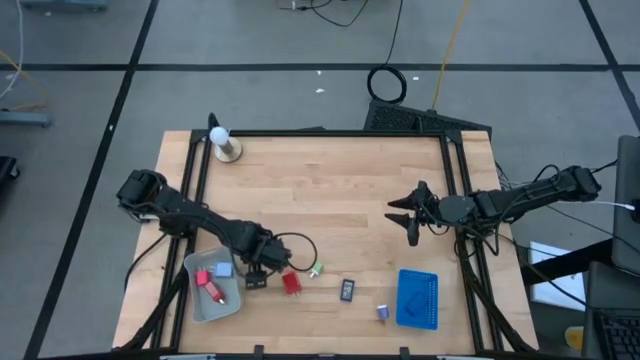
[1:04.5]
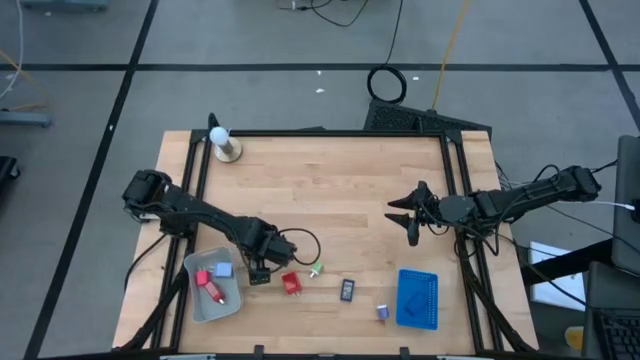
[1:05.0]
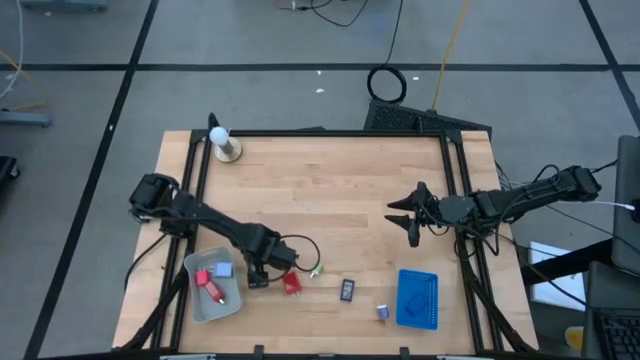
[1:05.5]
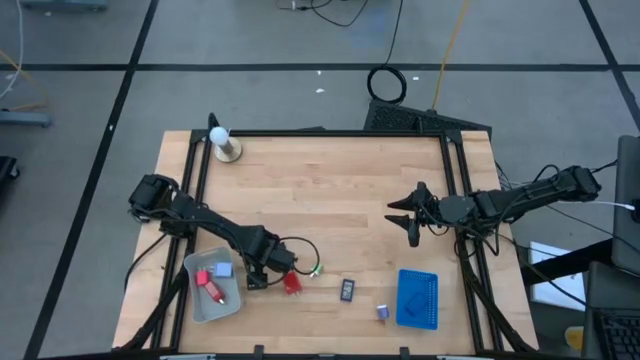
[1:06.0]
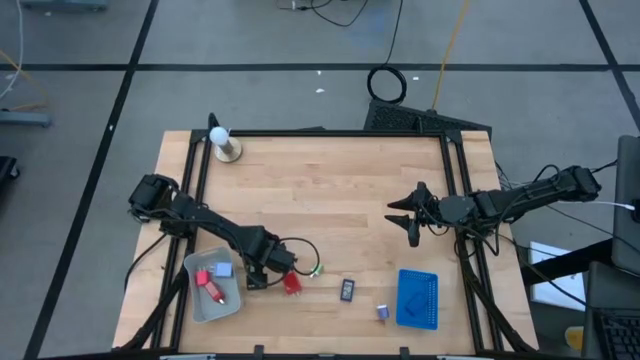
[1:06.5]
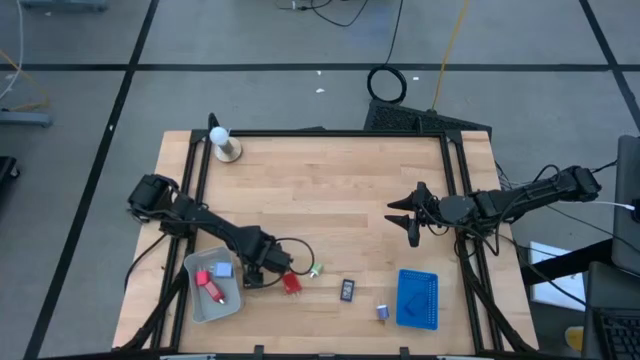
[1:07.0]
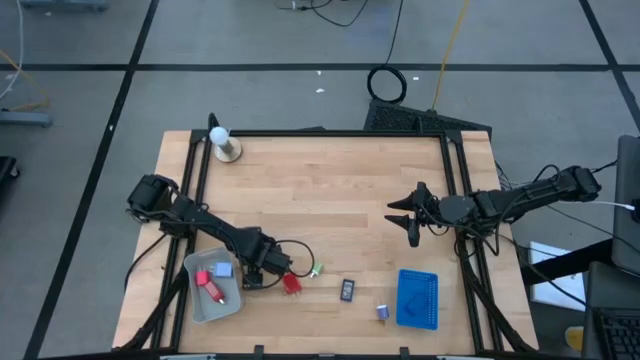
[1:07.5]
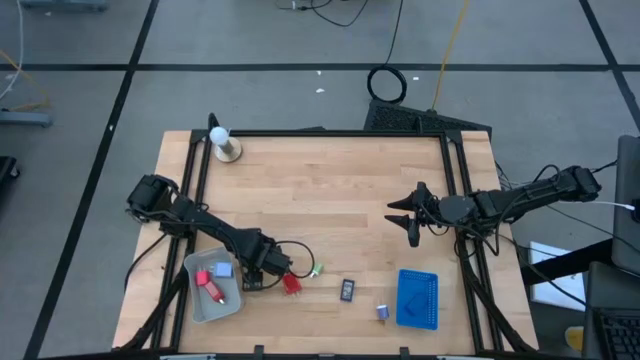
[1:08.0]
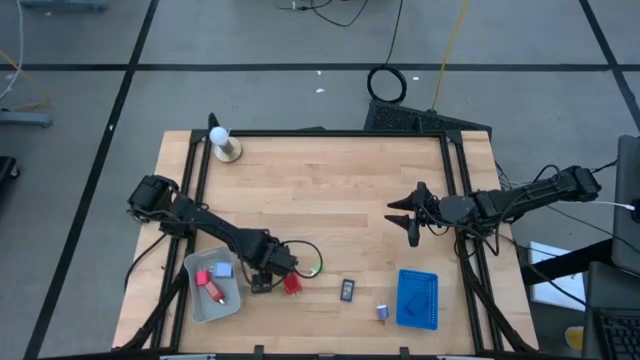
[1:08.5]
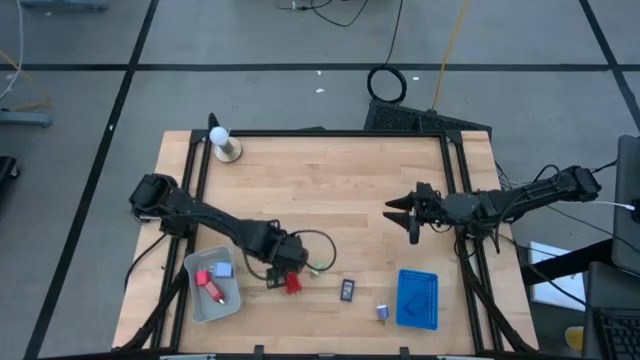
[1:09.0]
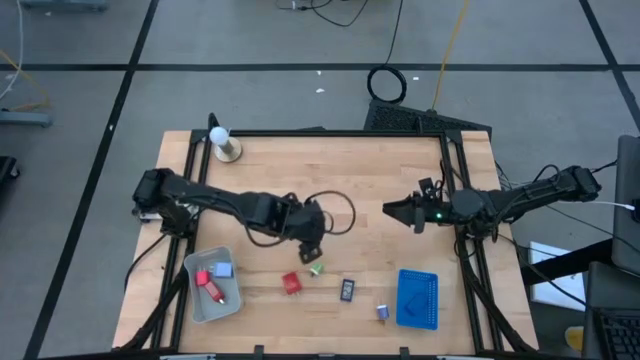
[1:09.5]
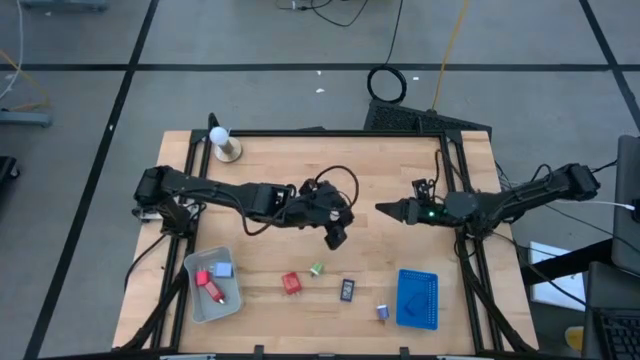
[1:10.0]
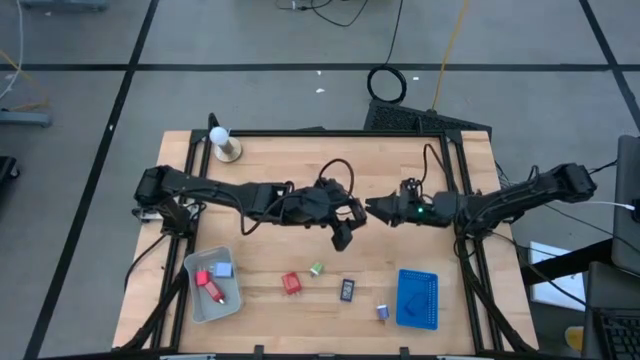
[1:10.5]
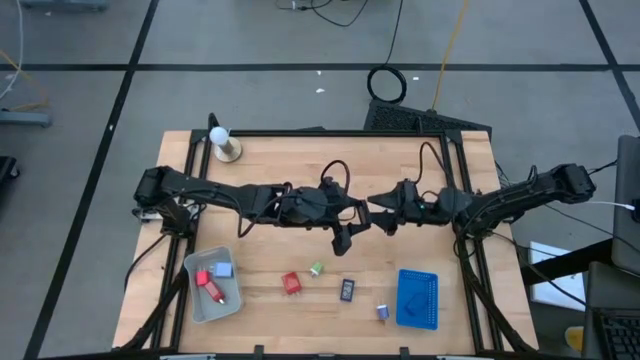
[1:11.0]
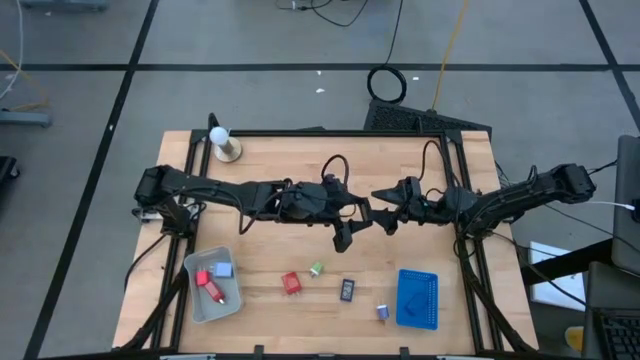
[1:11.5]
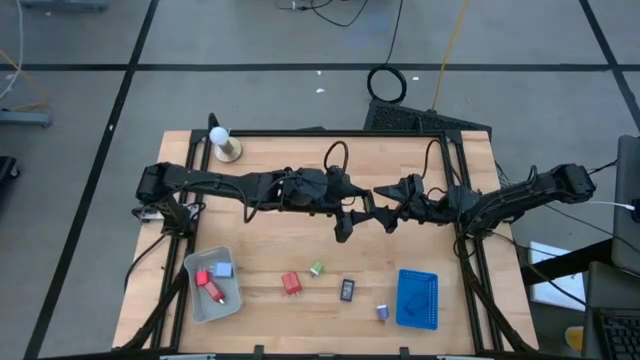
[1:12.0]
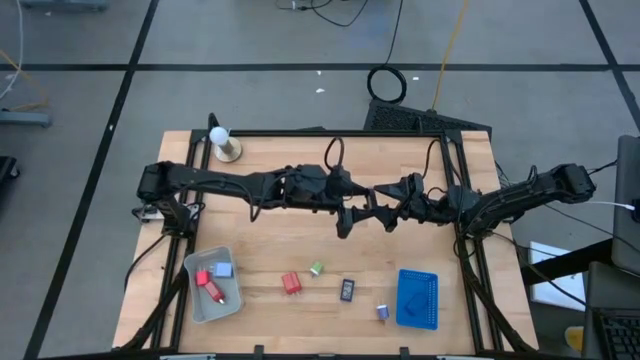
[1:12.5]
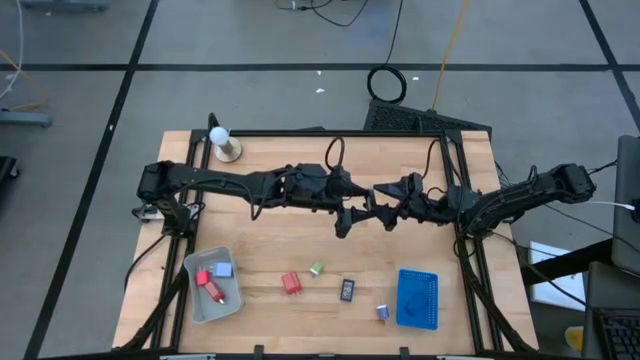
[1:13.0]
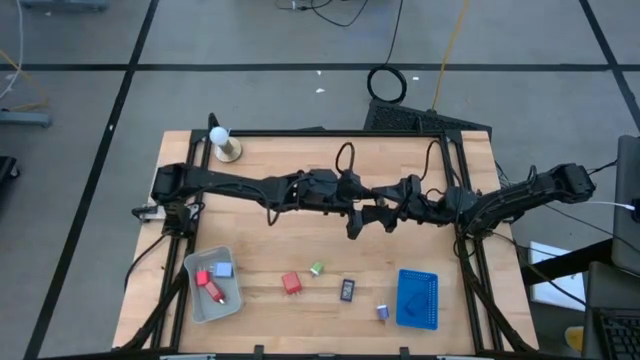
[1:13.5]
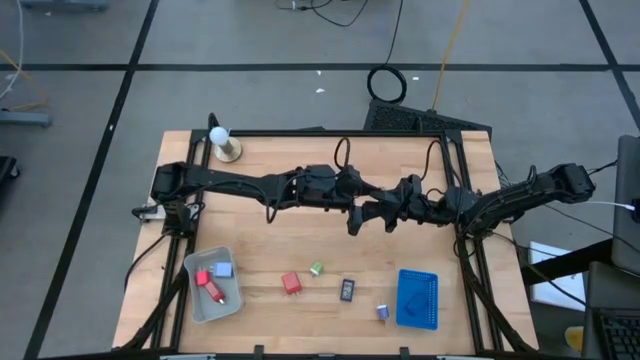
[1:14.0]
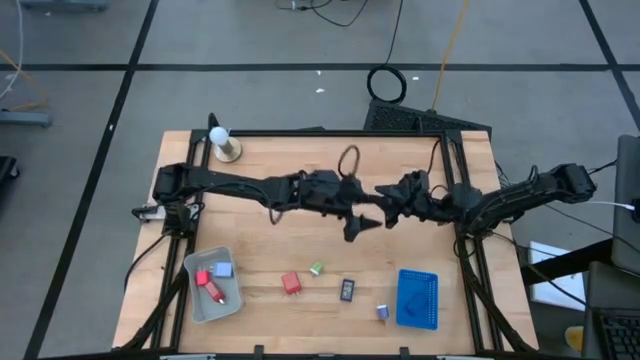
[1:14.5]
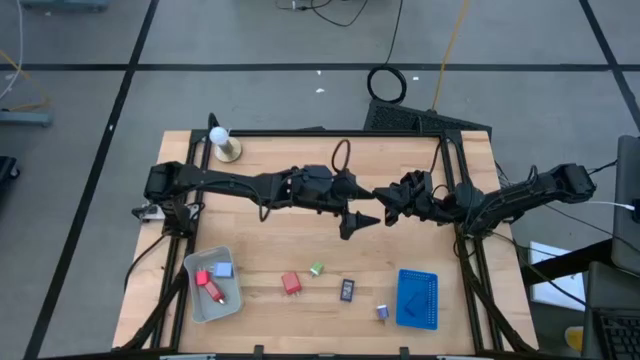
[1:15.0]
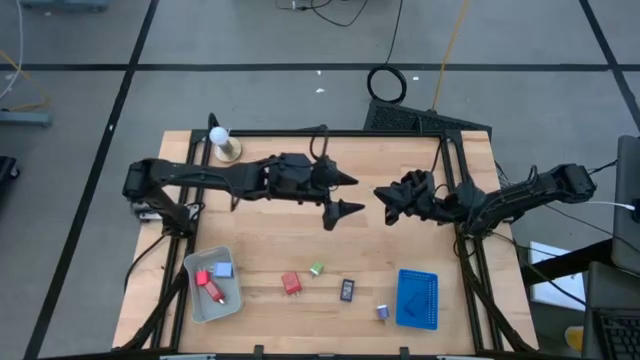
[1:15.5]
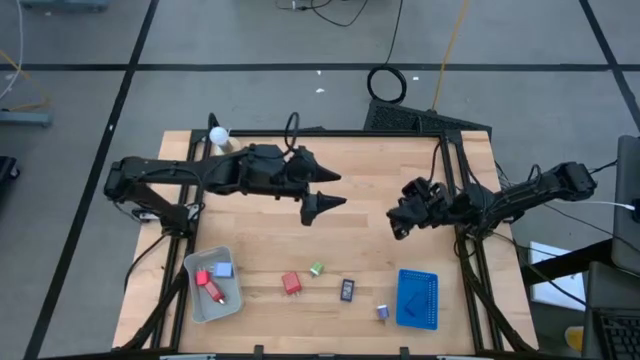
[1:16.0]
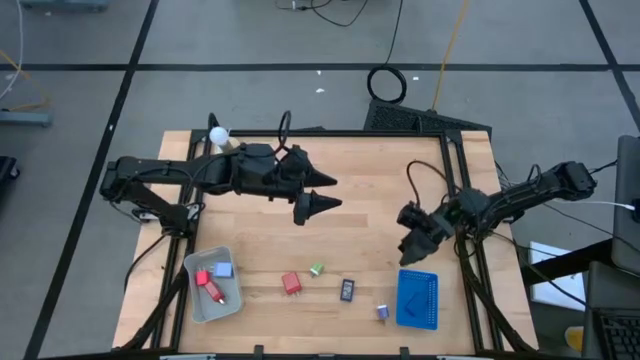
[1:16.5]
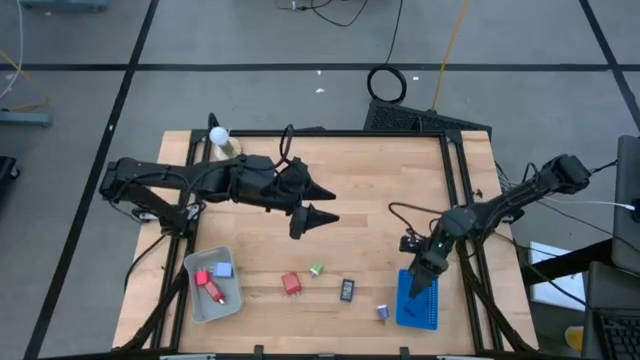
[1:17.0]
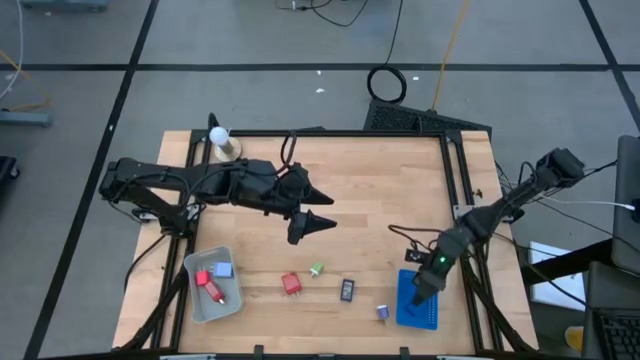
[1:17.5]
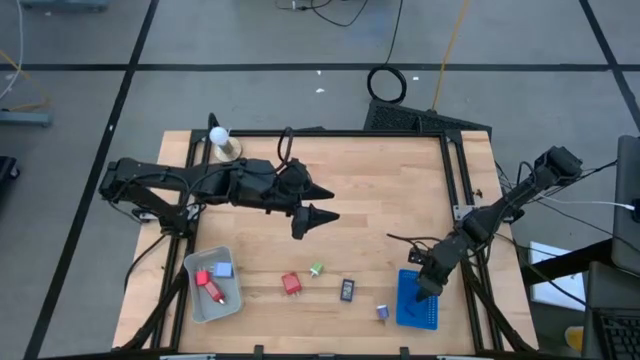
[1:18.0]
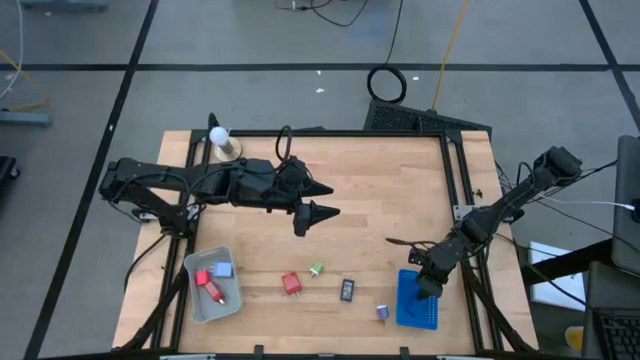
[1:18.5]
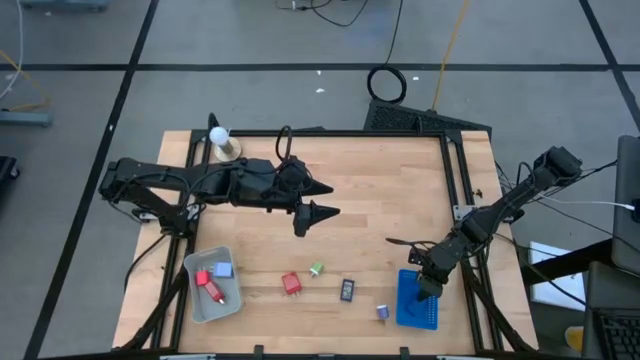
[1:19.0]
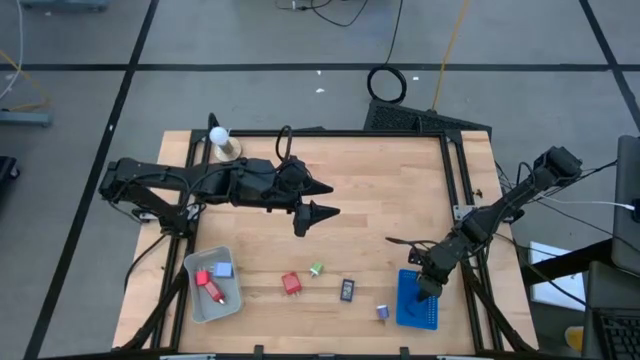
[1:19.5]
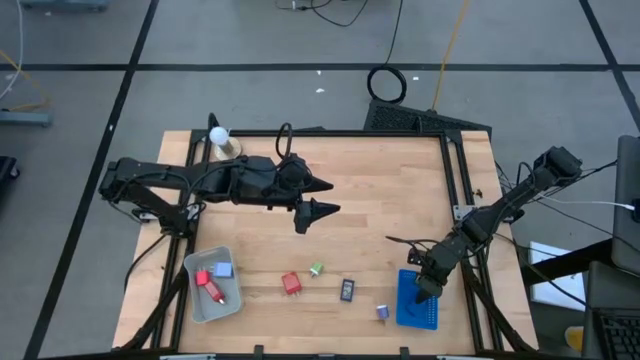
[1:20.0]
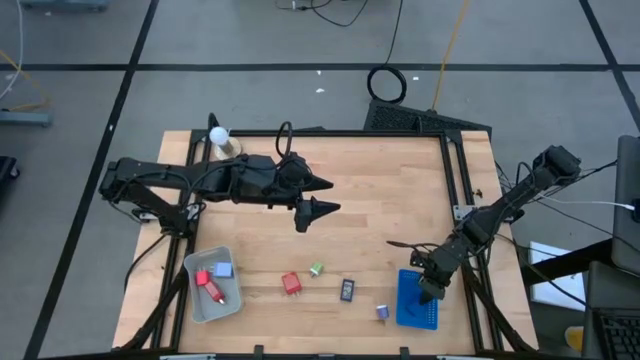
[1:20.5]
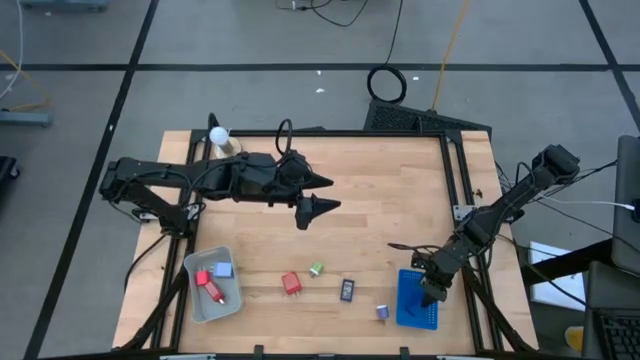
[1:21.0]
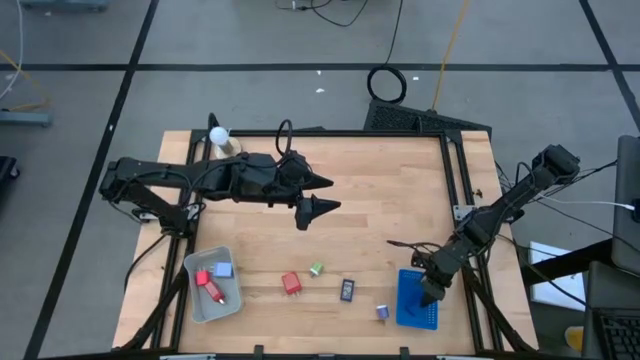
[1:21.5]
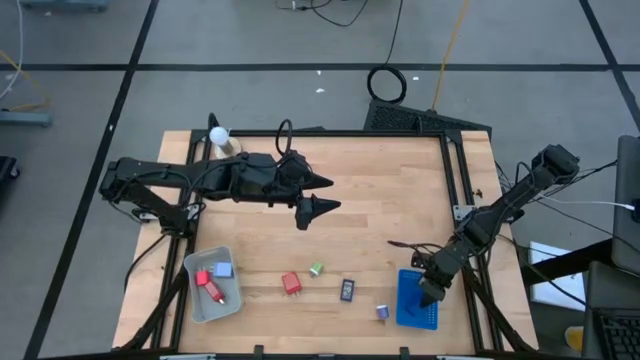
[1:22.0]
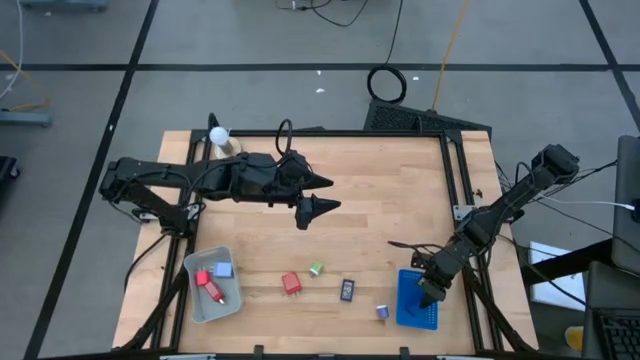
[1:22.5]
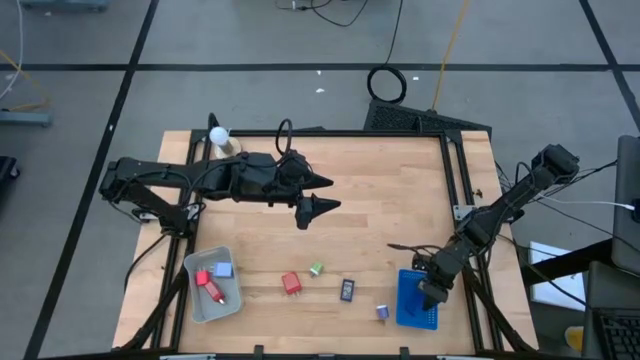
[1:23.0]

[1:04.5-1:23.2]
Task: Pick & Place Office items
Put the black mini digital clock into the blue bin

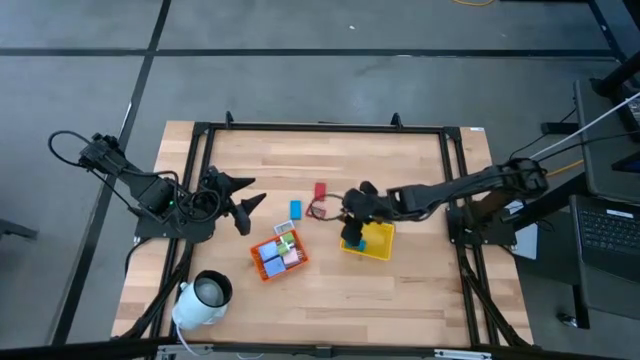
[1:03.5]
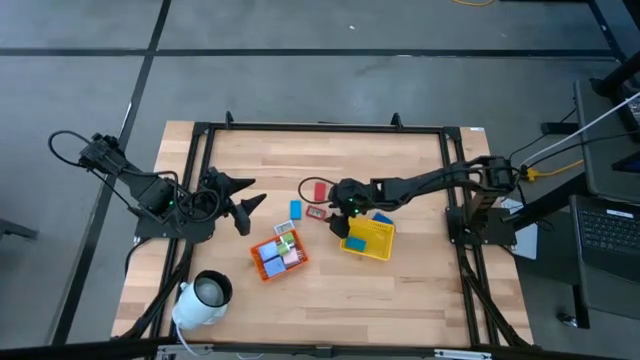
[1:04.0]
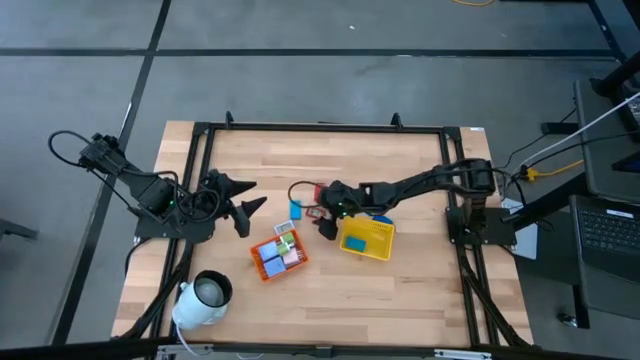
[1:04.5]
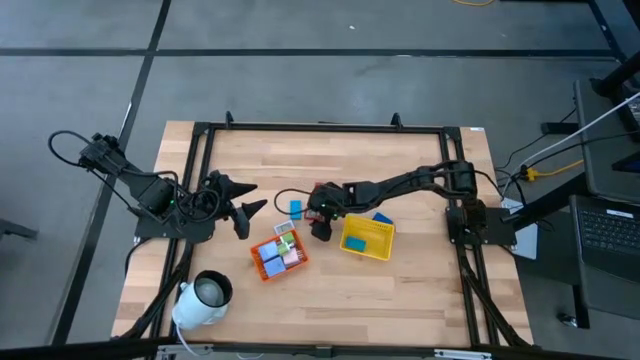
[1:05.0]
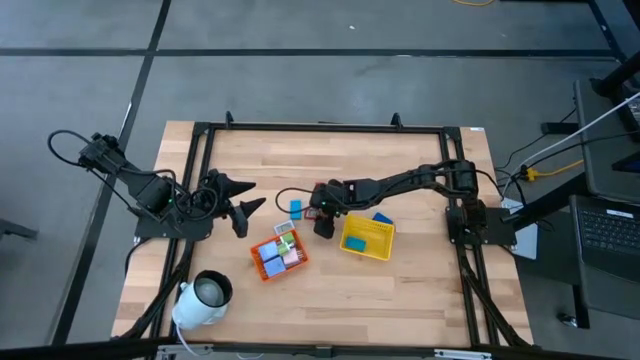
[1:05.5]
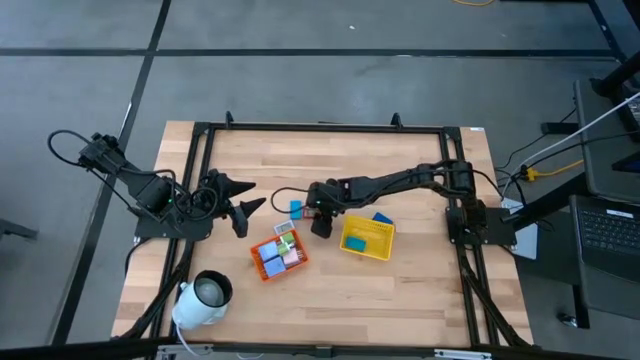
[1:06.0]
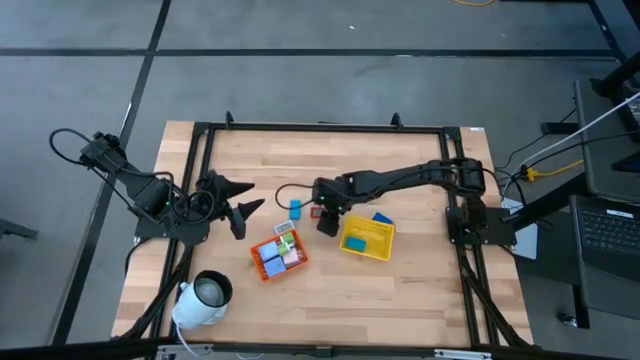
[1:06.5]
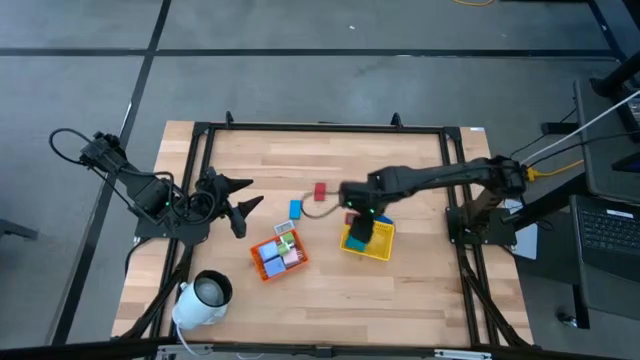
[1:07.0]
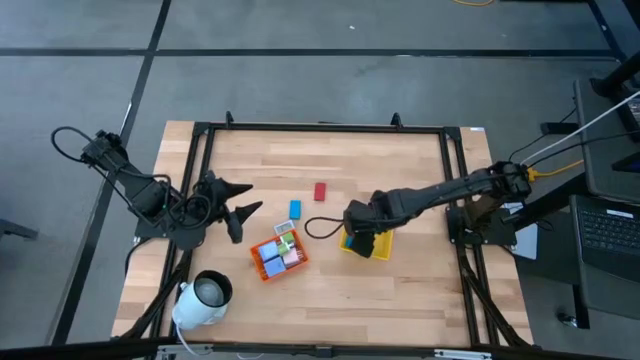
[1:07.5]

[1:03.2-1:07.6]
Task: Pick & Place Office items
Put the bottom red digital clock into the yellow bin
